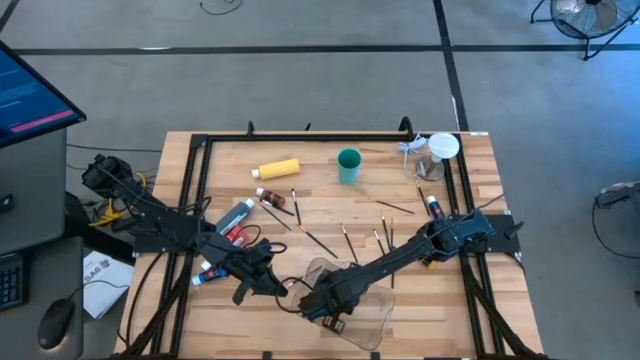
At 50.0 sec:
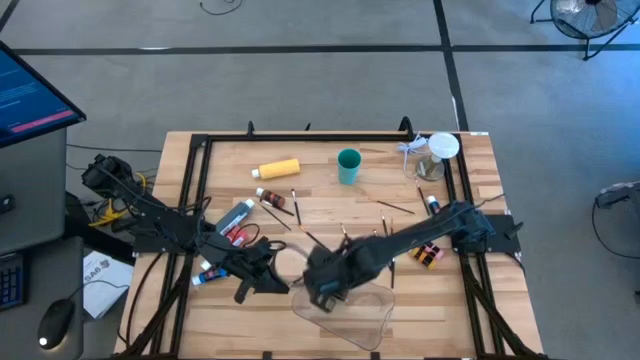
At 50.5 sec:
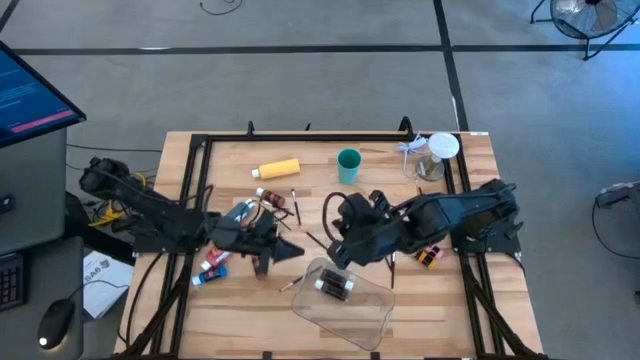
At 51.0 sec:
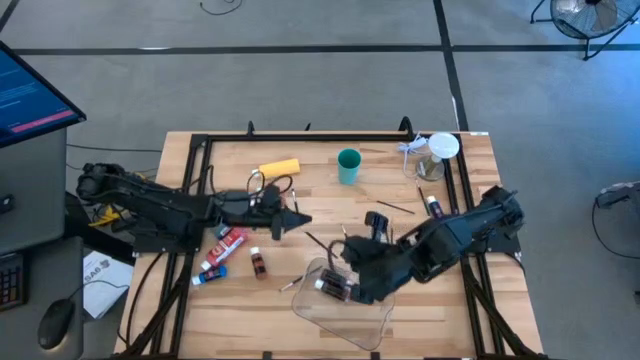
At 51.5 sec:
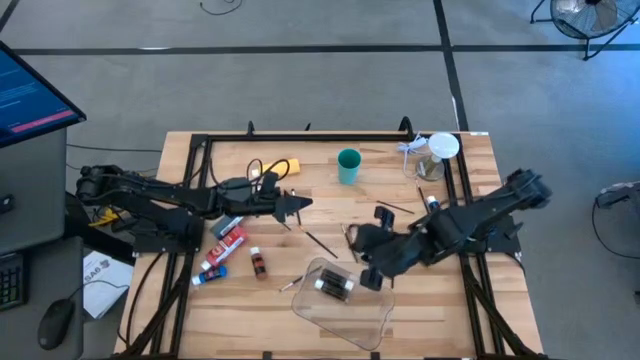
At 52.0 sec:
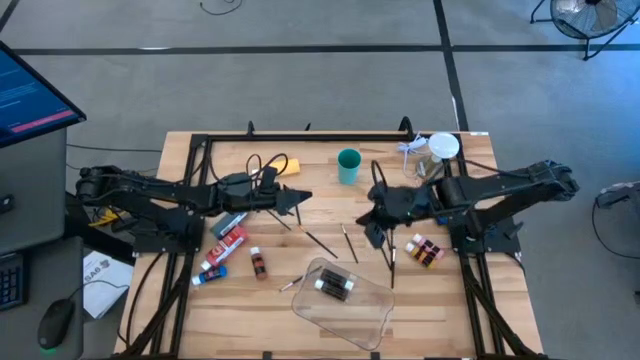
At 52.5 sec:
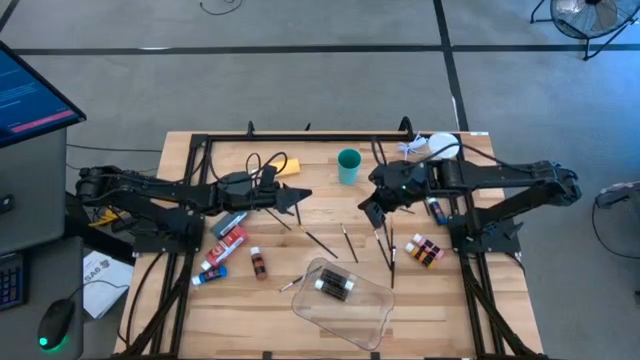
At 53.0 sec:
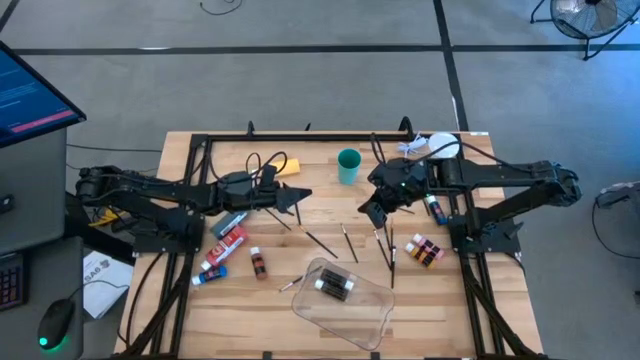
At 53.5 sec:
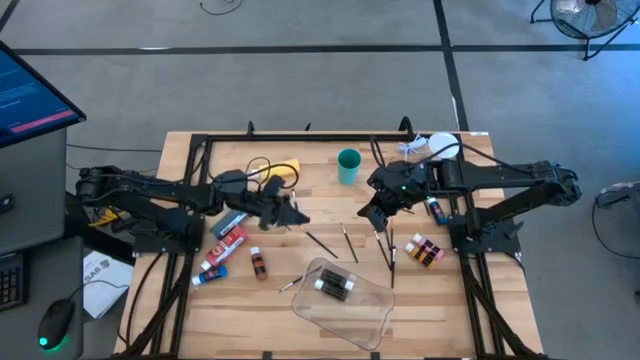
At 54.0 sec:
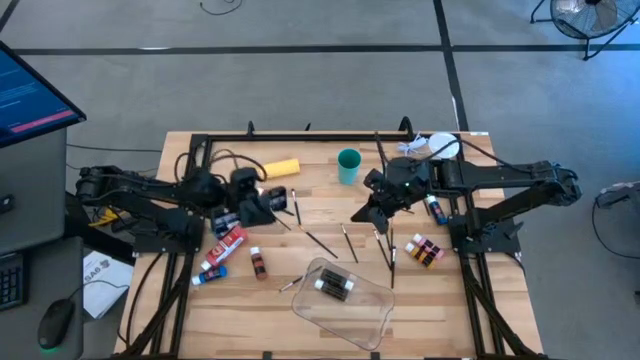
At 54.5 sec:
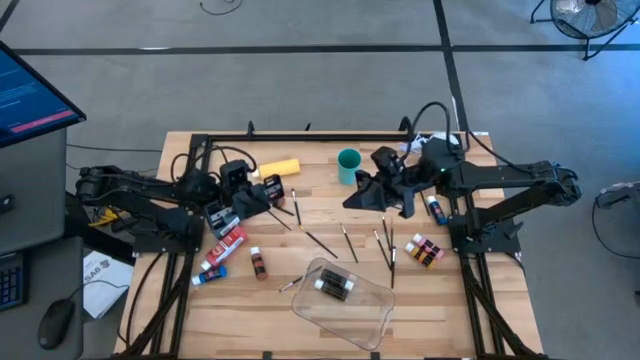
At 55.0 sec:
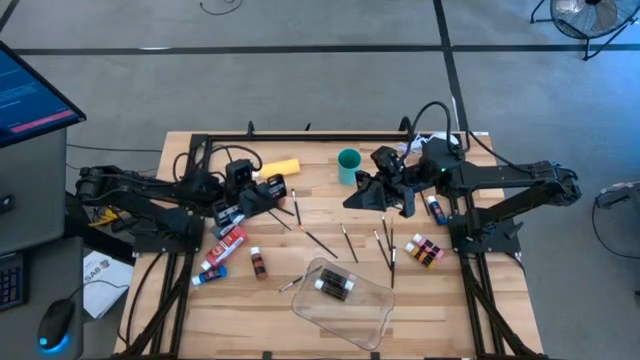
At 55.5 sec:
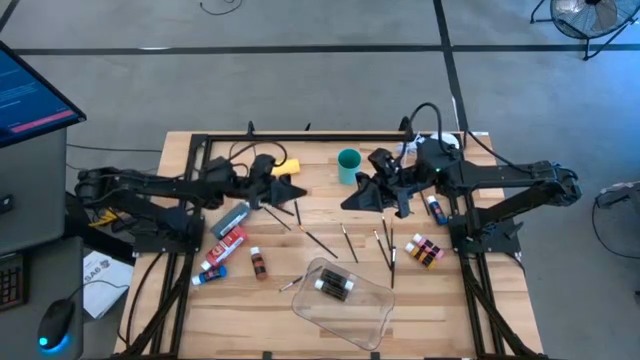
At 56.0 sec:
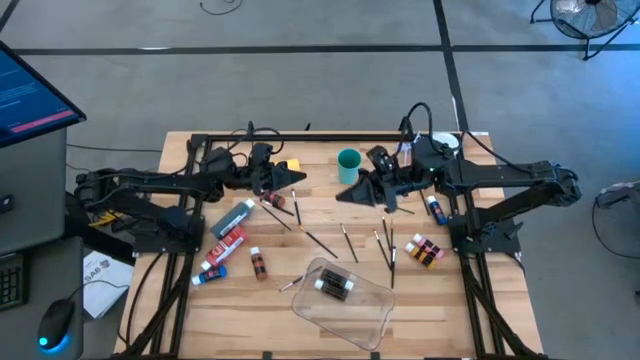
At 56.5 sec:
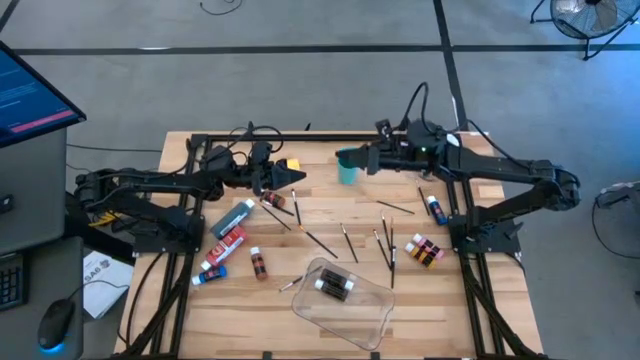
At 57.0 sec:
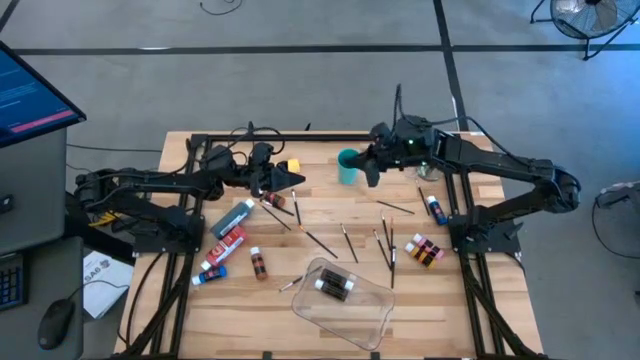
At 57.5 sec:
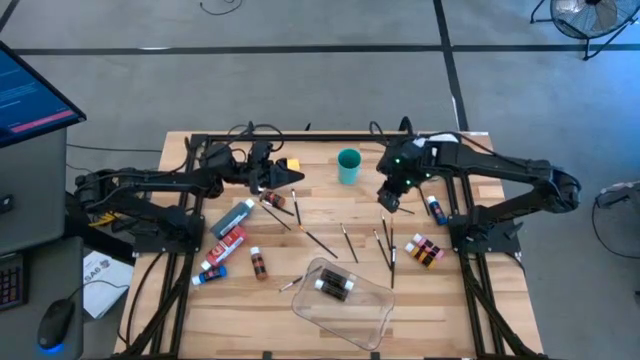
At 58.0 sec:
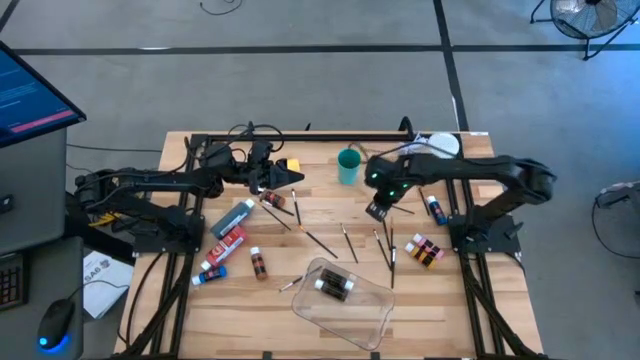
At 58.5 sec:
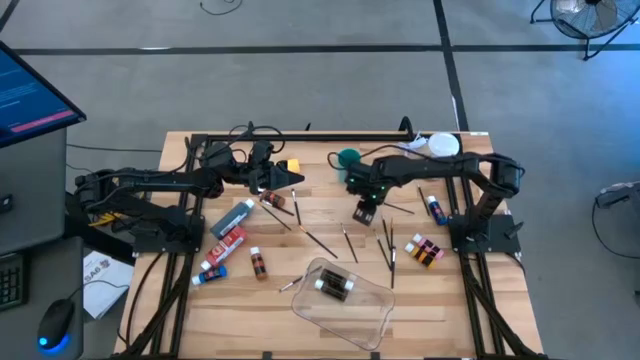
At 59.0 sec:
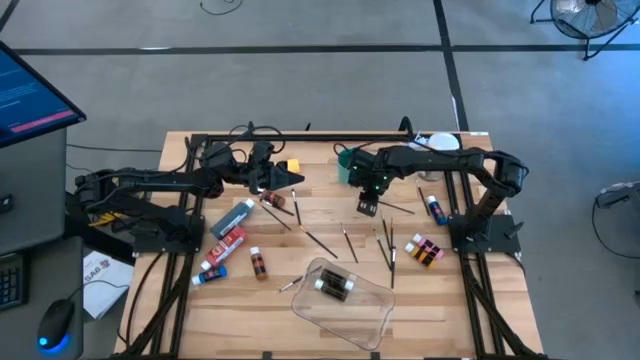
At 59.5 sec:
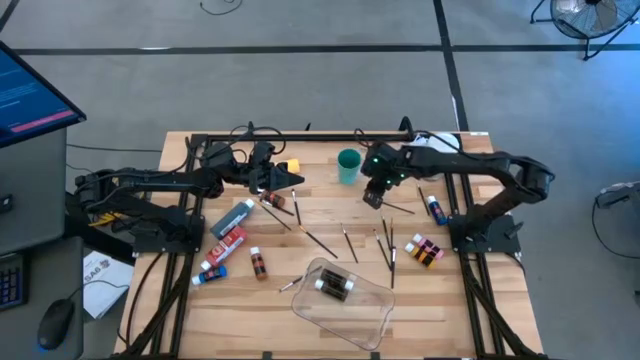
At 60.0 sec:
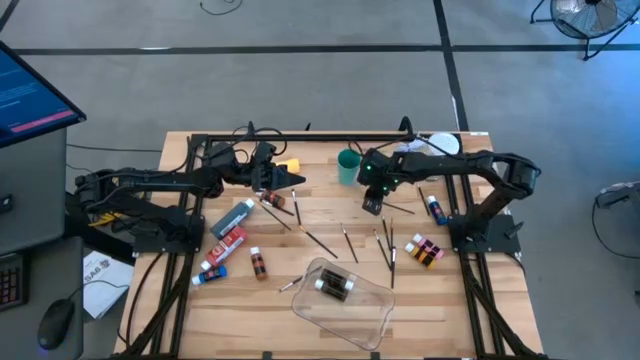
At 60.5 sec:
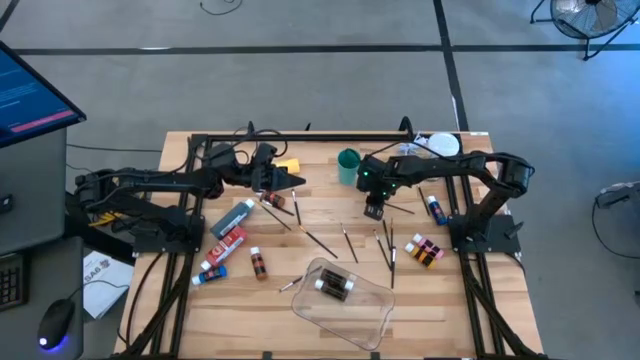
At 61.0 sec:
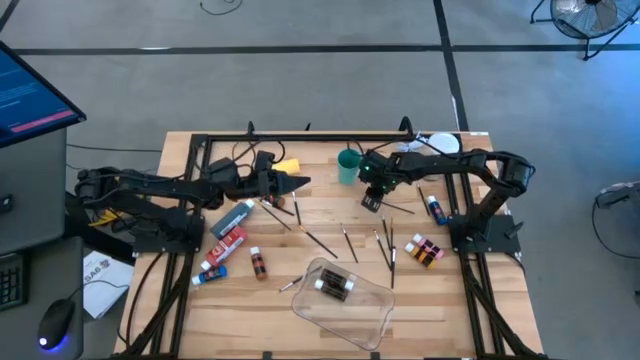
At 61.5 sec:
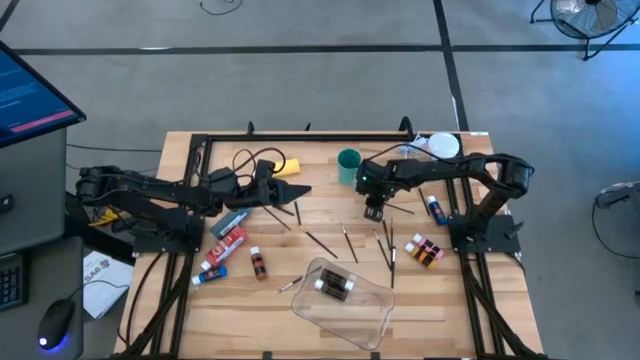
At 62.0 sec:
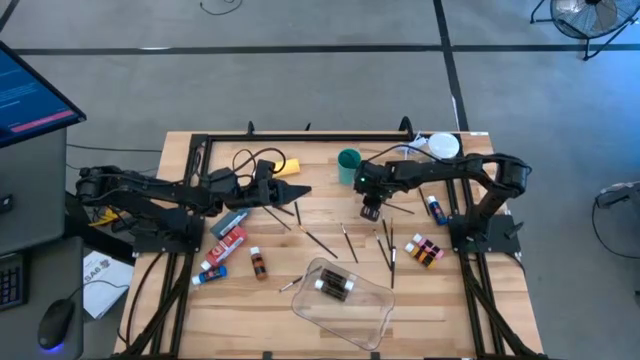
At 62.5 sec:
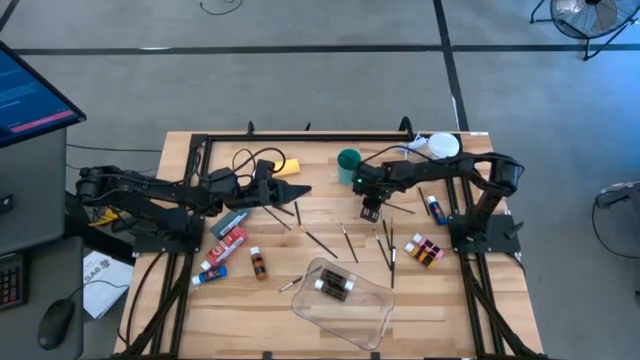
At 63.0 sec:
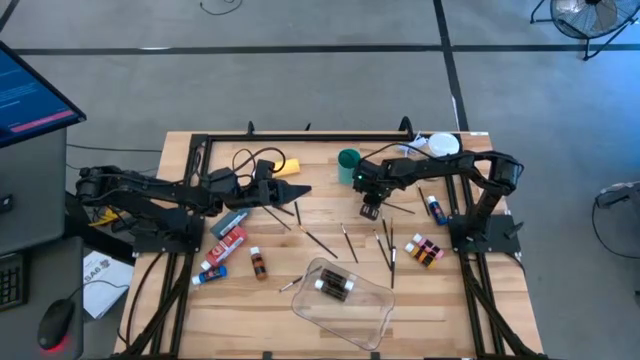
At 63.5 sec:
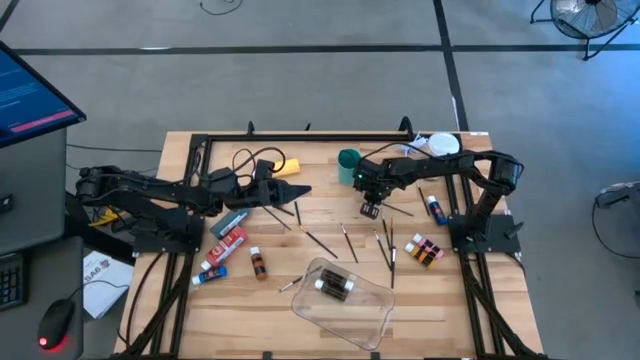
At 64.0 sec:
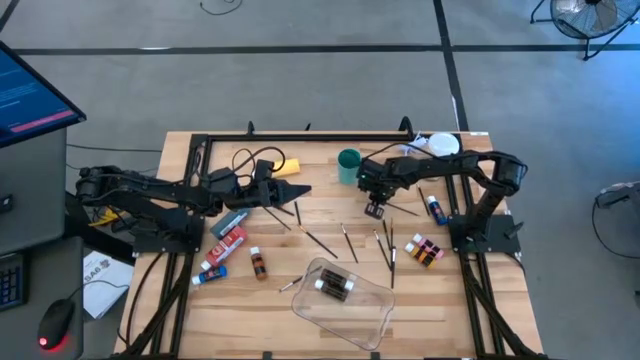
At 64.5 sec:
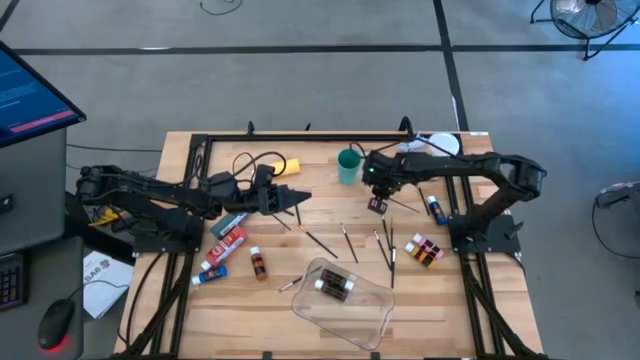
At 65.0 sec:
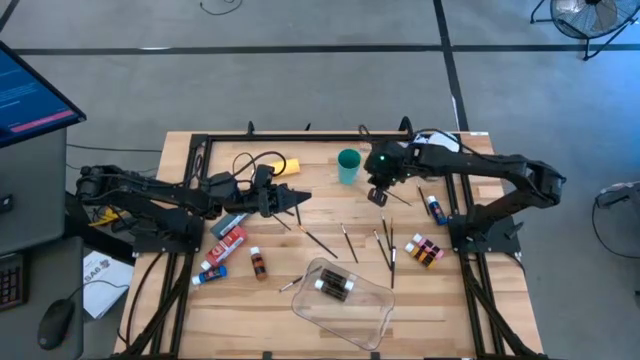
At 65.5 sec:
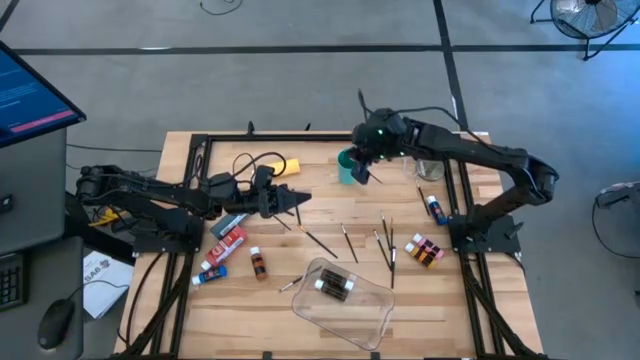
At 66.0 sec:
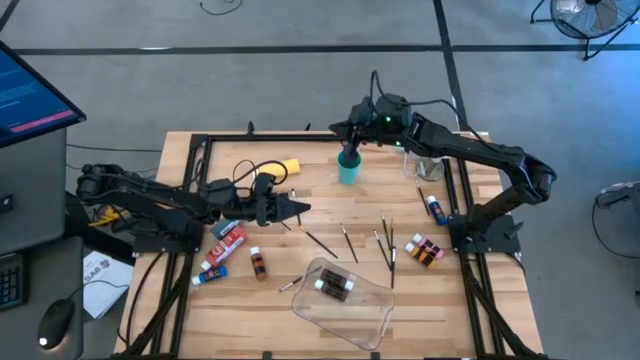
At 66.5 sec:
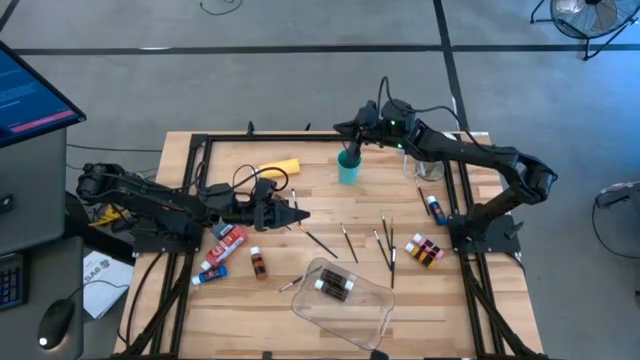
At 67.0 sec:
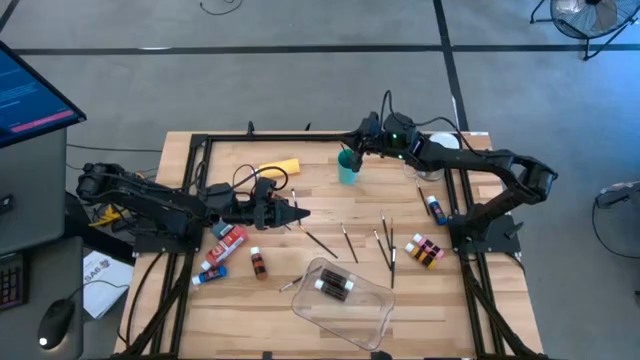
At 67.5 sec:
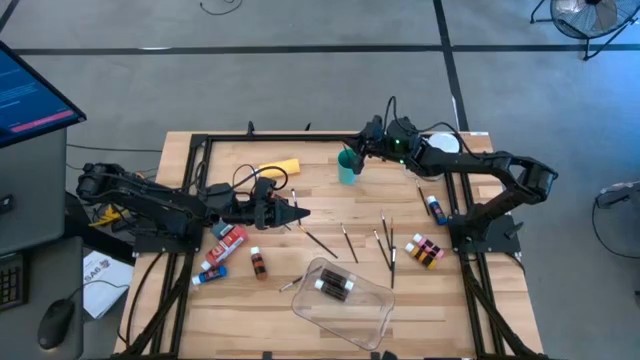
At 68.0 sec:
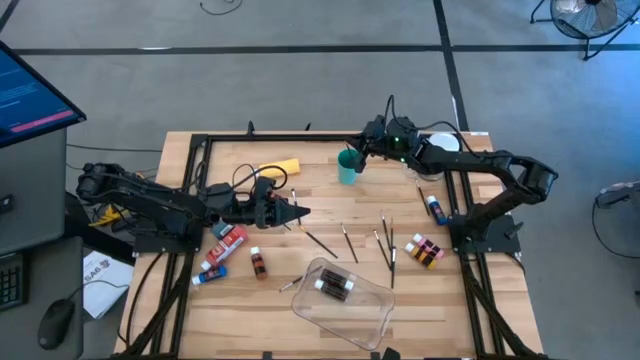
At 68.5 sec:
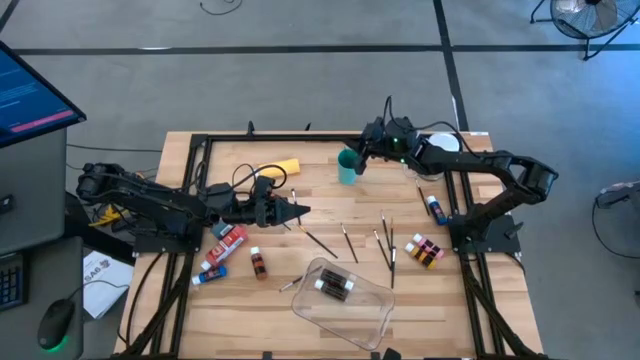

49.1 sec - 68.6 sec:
Task: Pick & Place Paint Supplies
Put the gold paint brush into the green cup
